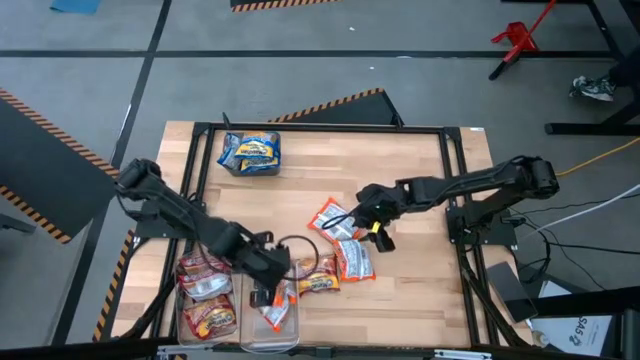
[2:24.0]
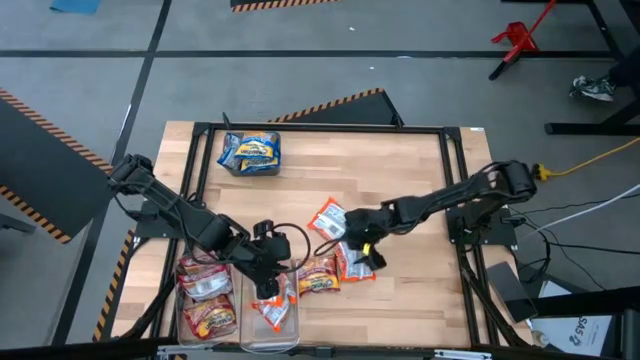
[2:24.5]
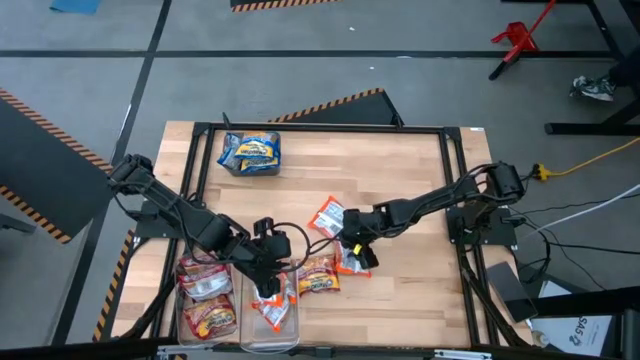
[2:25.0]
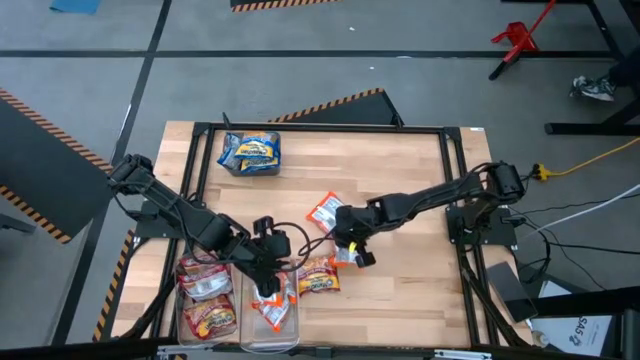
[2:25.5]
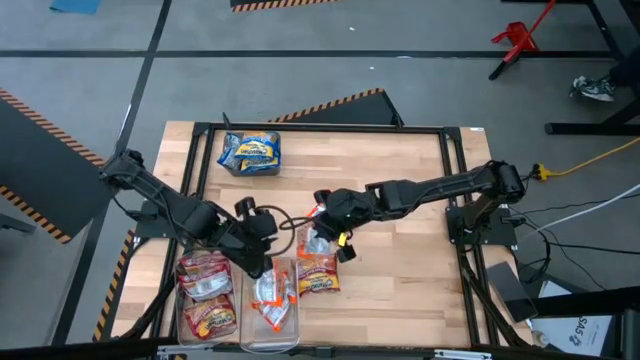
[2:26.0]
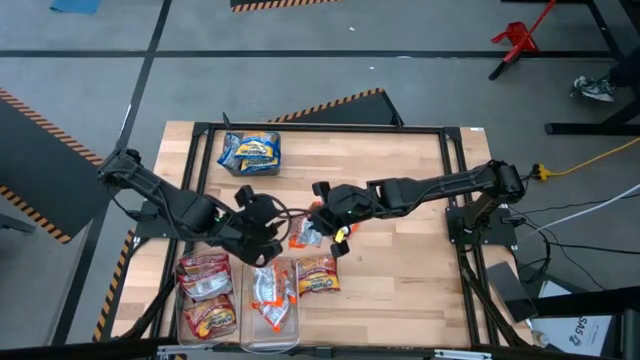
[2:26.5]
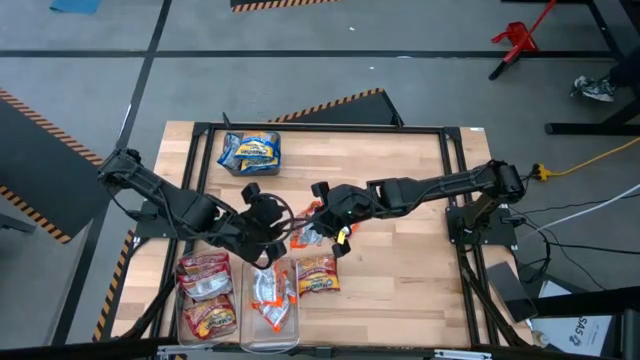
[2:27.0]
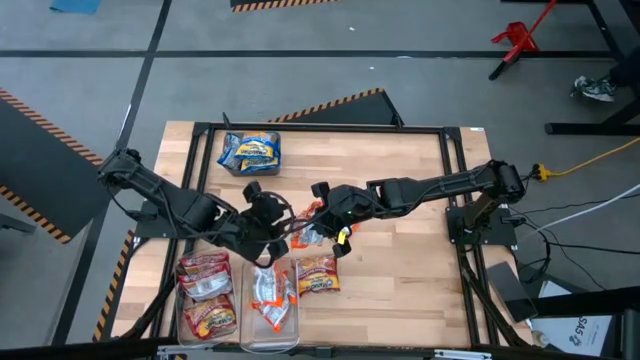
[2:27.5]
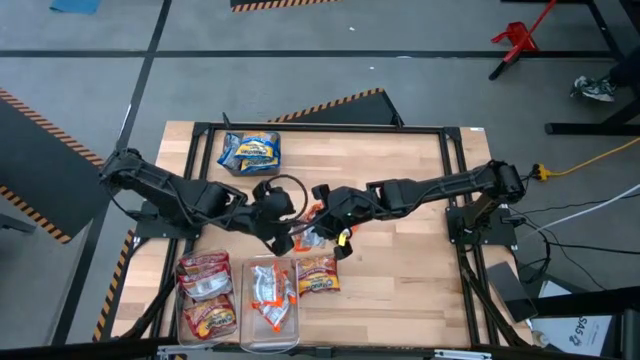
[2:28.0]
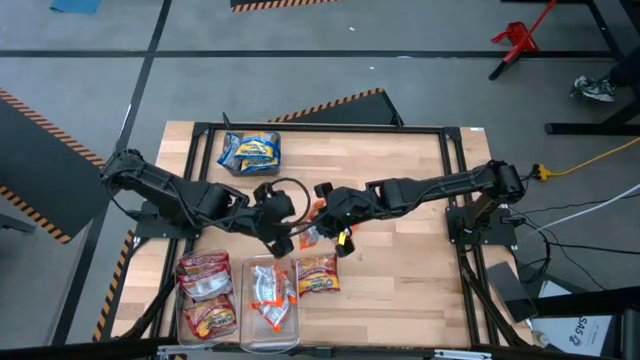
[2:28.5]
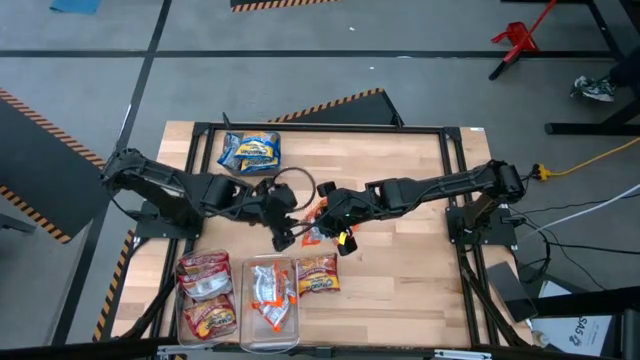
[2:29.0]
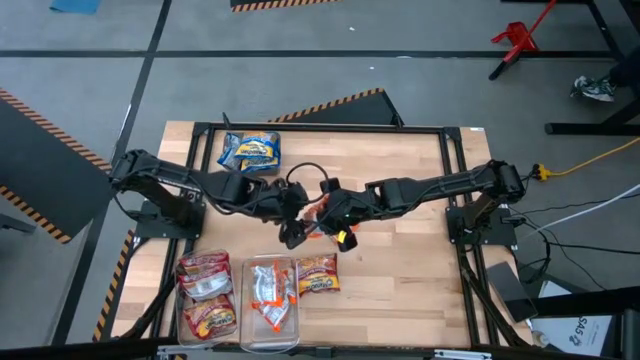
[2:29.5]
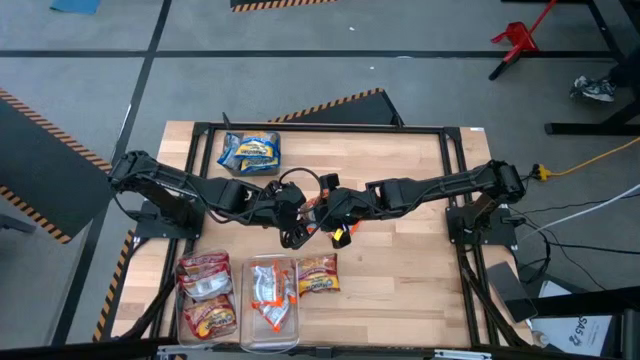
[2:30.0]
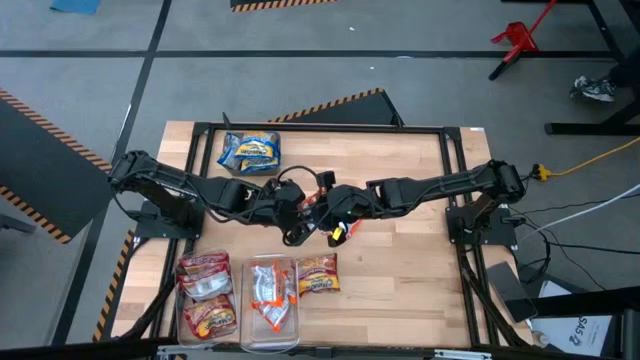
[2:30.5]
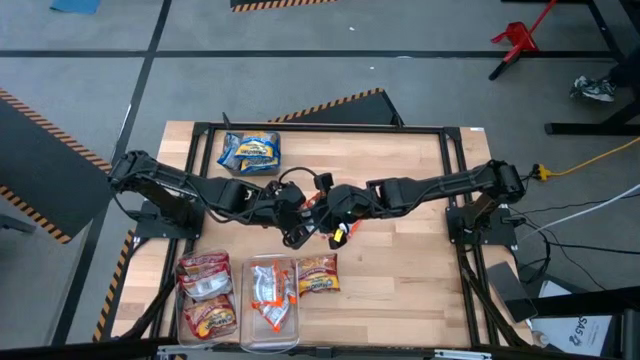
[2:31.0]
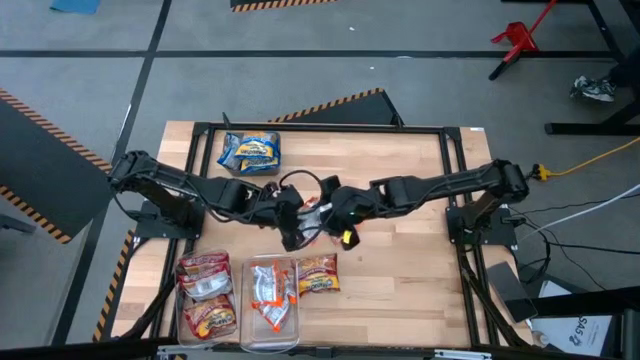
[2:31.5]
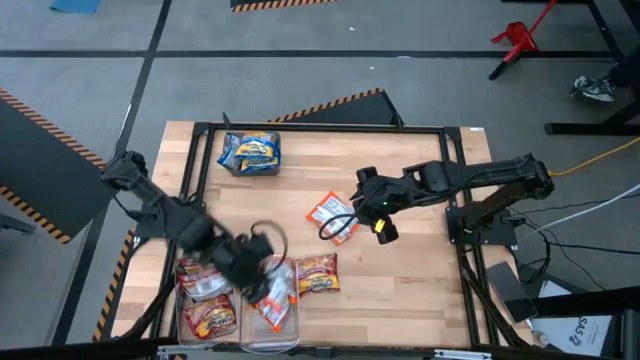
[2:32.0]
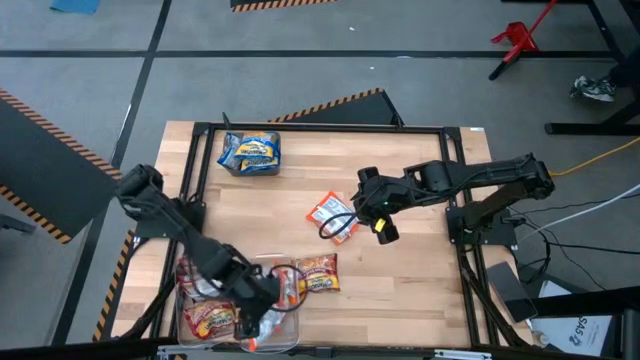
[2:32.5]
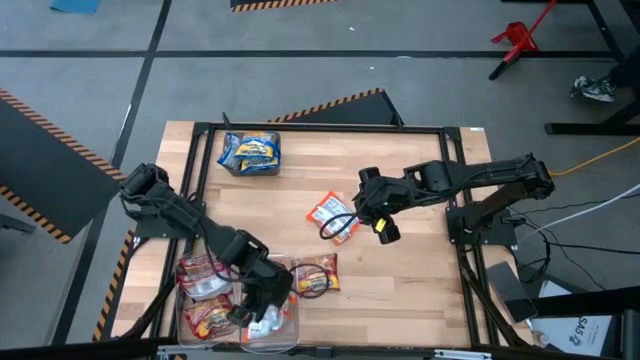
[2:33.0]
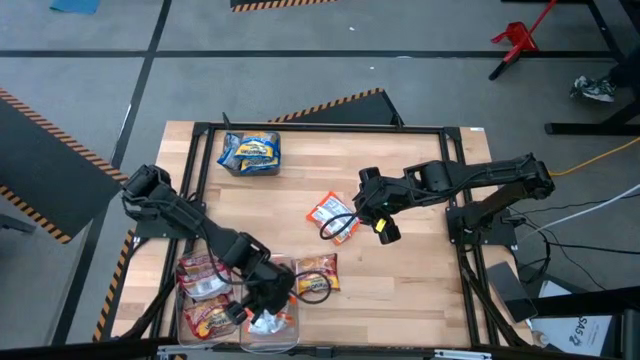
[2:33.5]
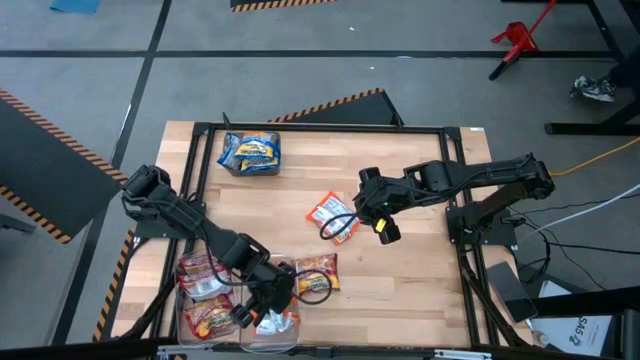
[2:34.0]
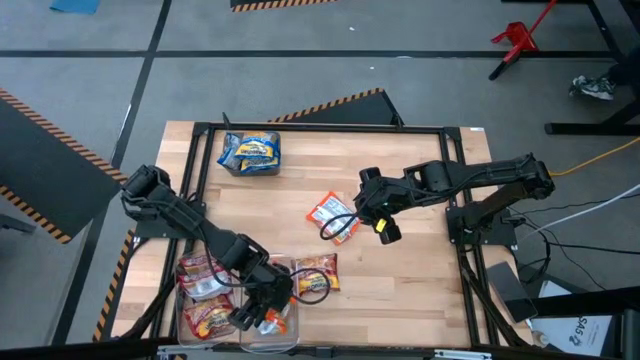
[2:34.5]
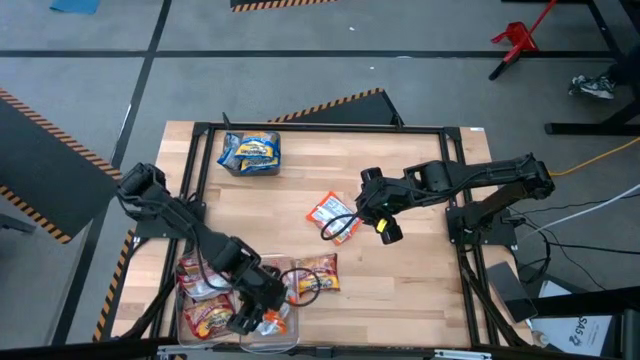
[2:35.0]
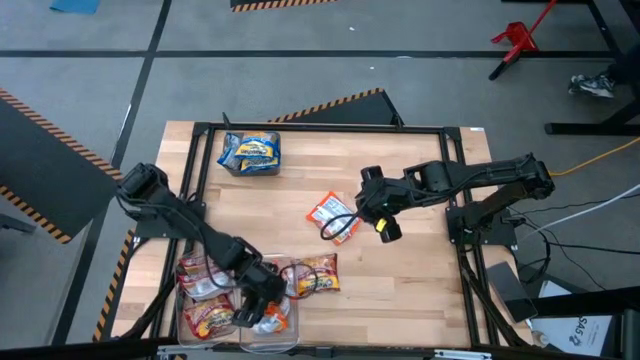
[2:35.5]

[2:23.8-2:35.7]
Task: Sort Maruchan noodles
Put the orange noodle pack into the right transparent bin

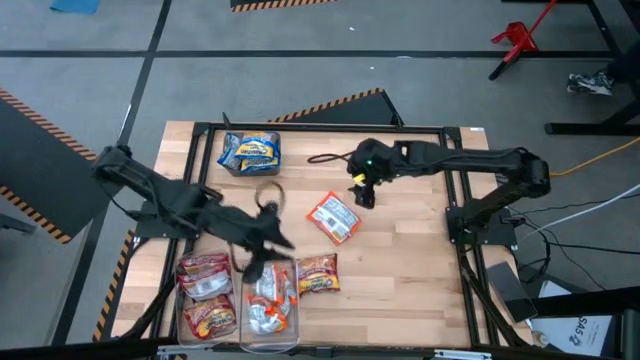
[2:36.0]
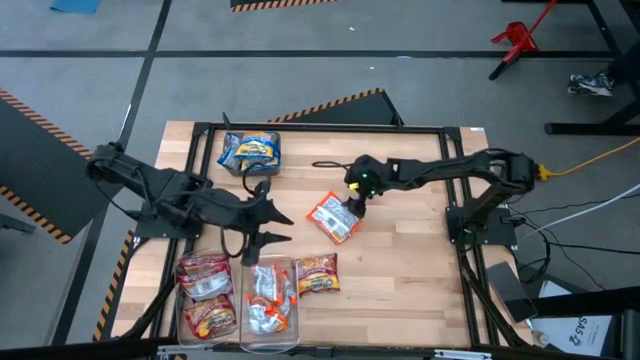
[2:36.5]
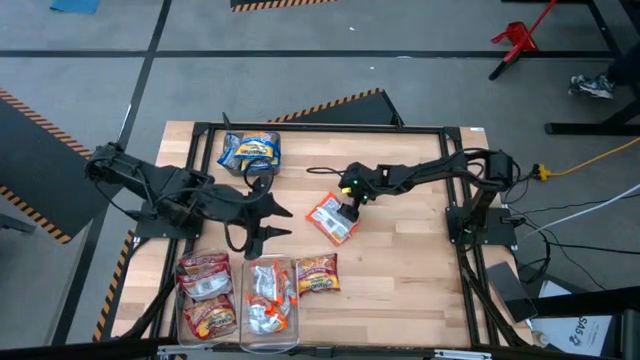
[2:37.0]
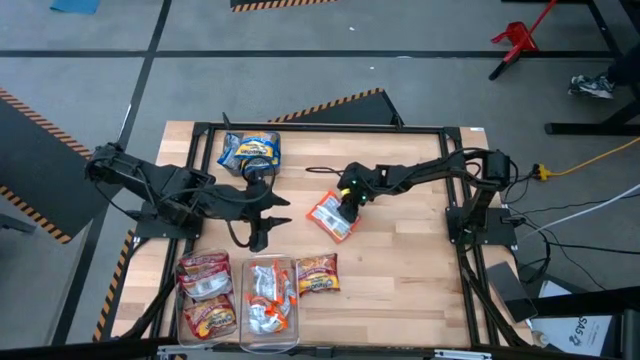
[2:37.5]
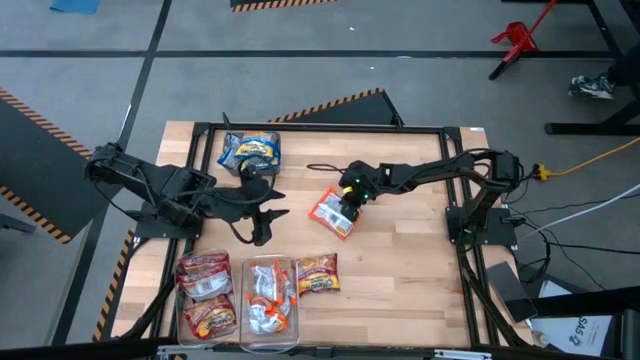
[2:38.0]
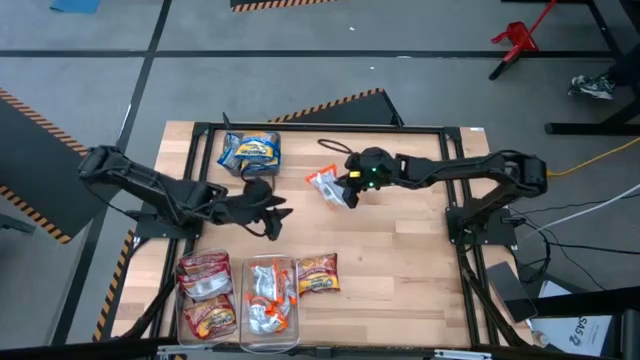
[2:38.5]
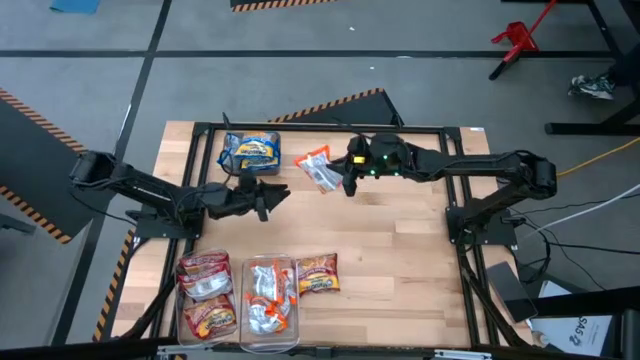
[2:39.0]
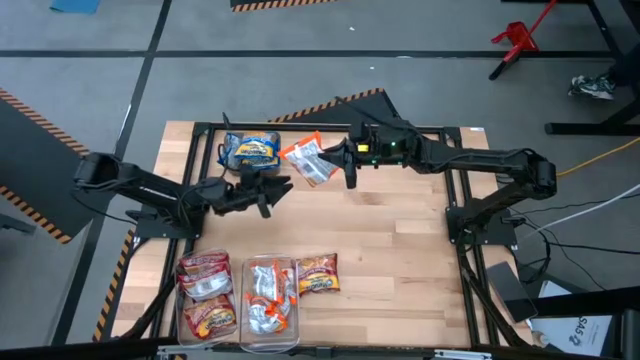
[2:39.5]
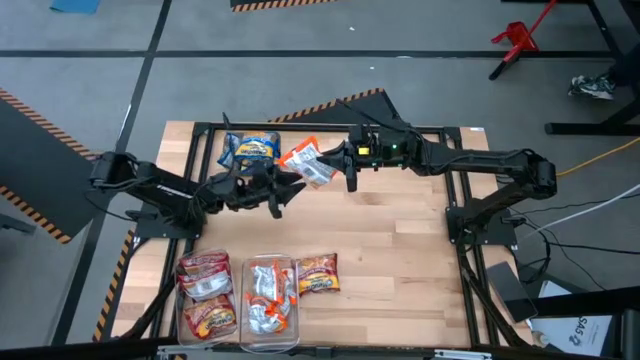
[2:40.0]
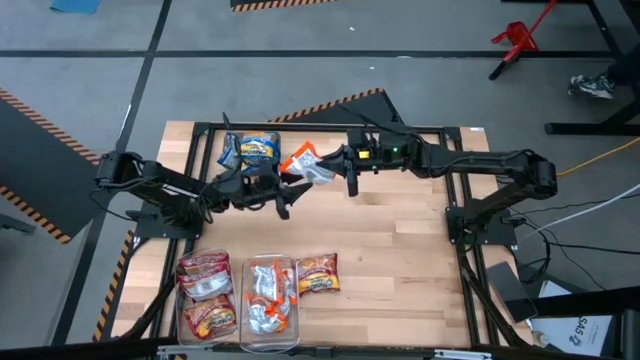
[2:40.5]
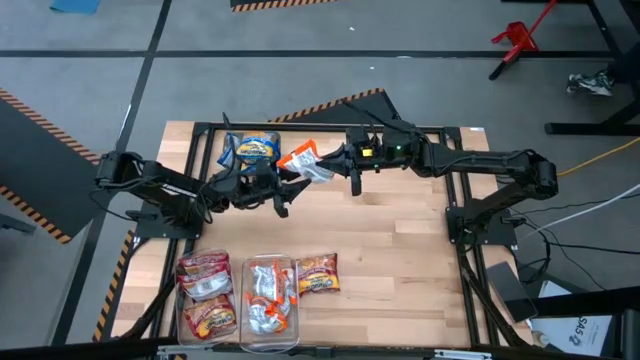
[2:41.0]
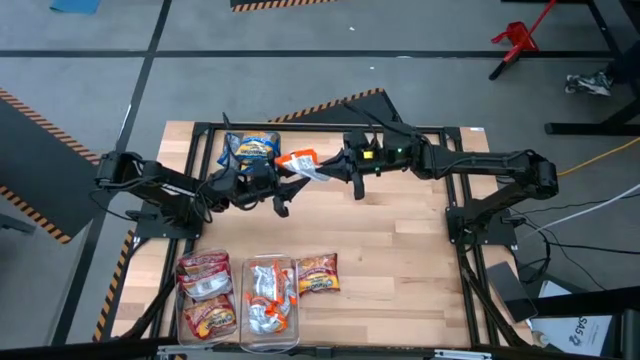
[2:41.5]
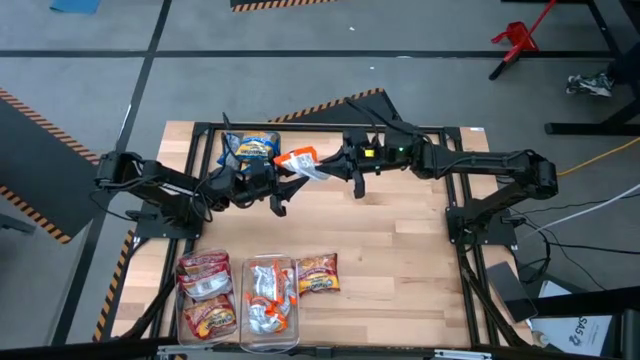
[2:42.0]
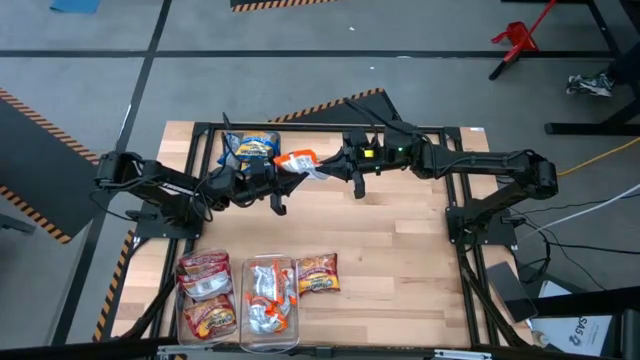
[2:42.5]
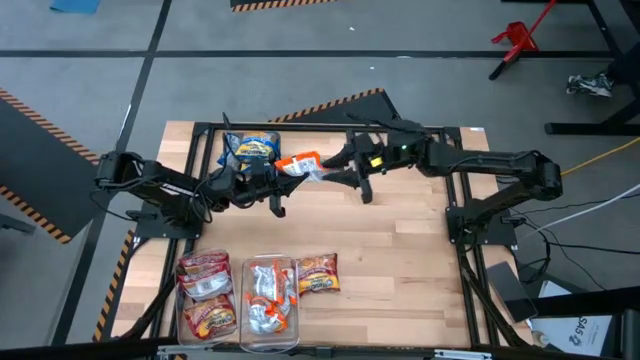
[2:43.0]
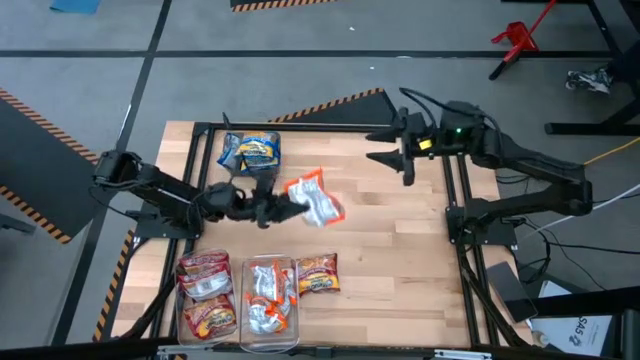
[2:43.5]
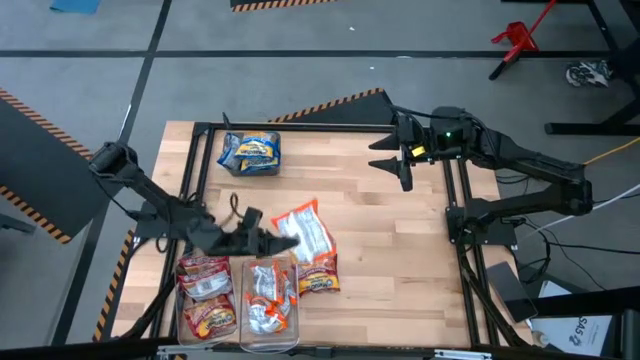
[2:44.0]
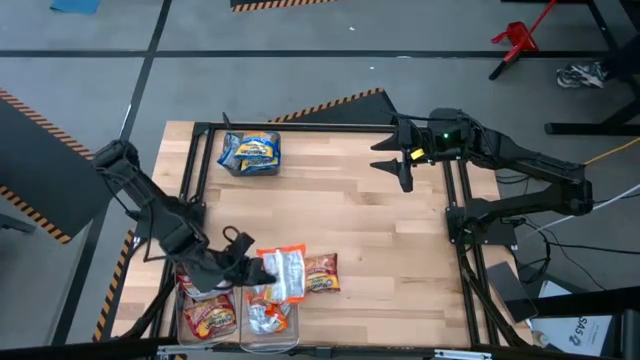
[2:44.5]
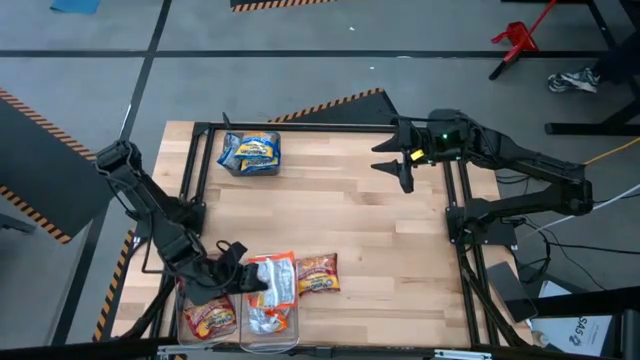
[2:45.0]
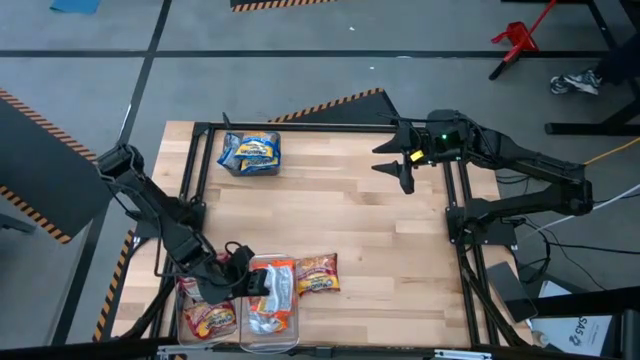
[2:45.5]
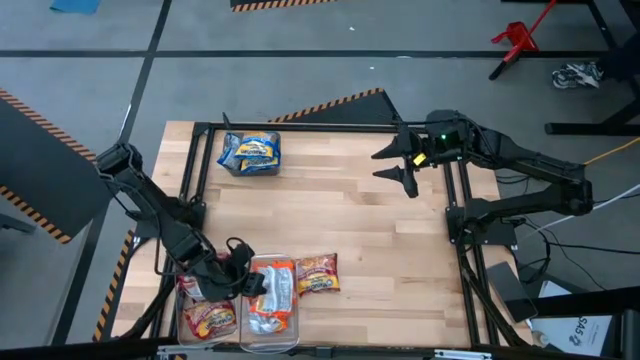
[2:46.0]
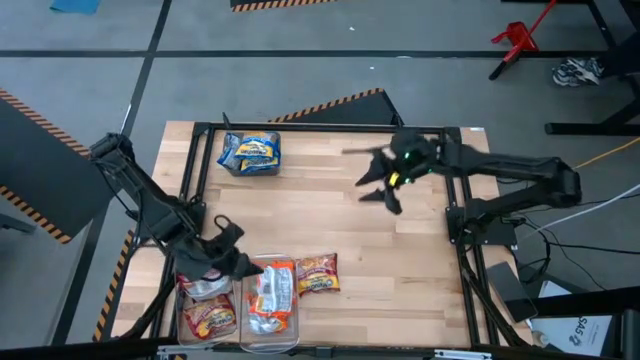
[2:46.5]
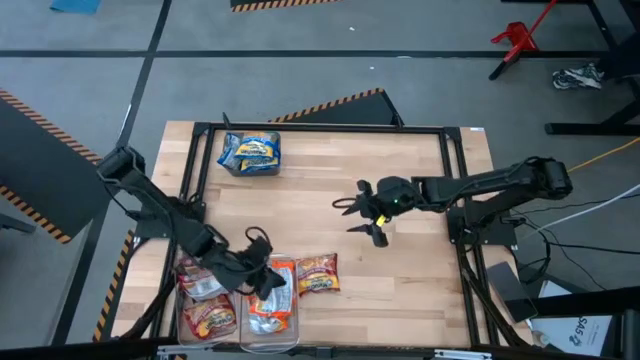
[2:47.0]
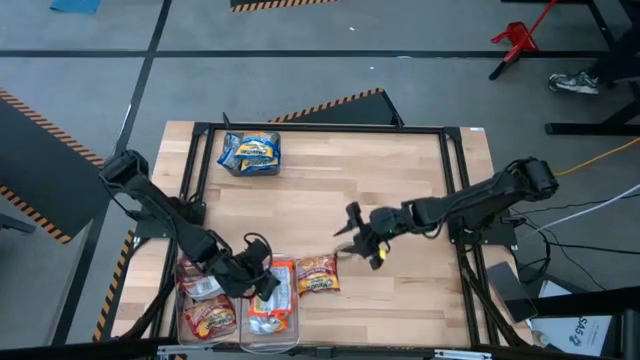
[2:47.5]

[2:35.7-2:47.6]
Put the orange noodle pack into the right transparent bin
